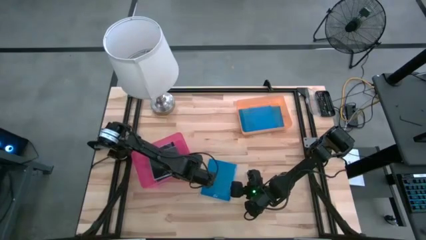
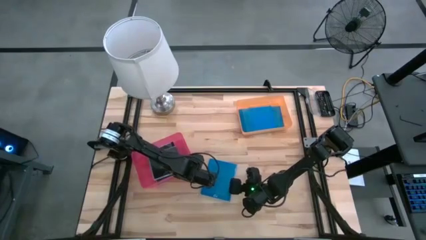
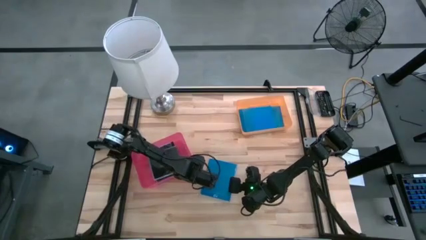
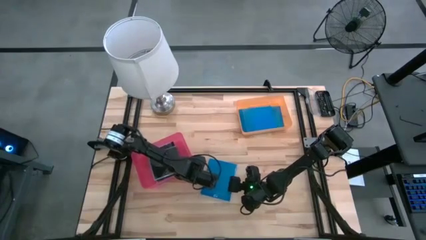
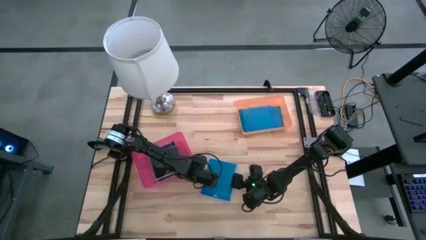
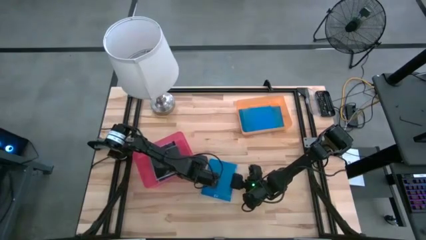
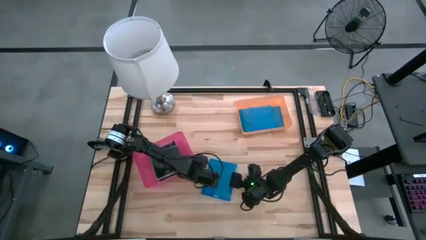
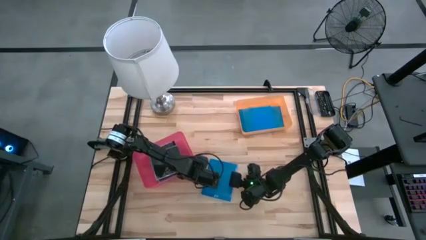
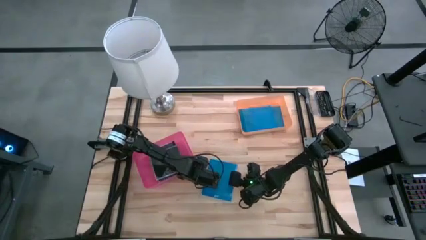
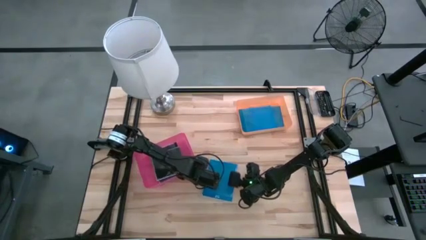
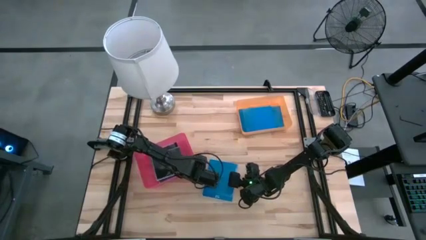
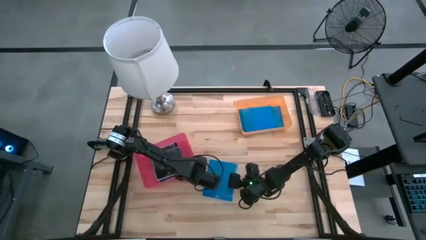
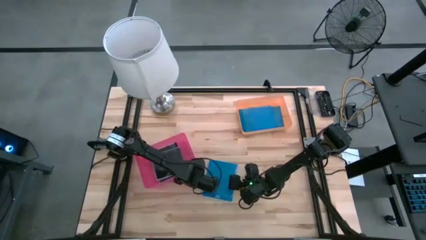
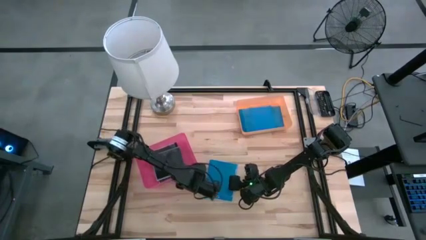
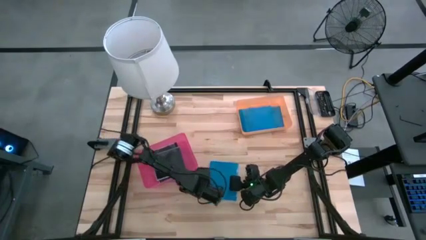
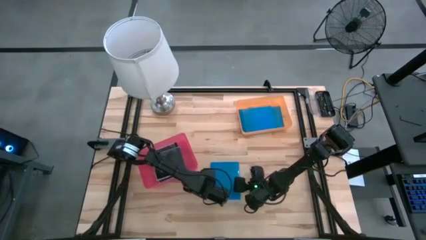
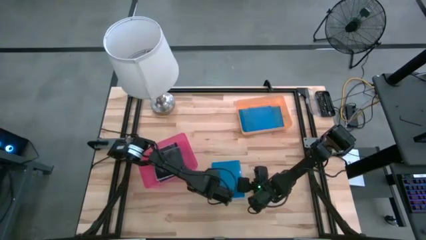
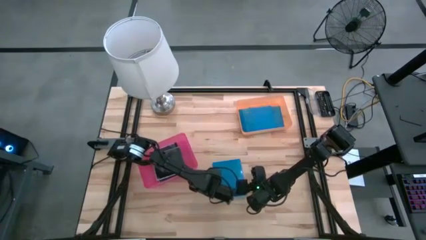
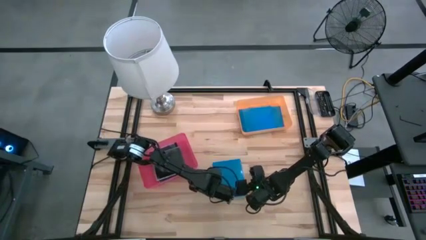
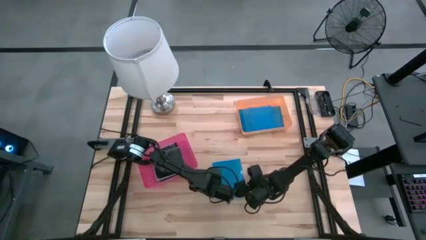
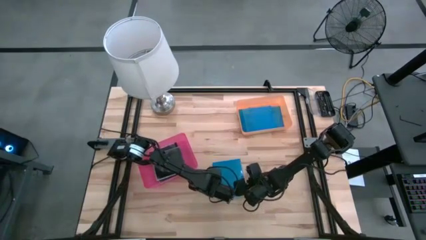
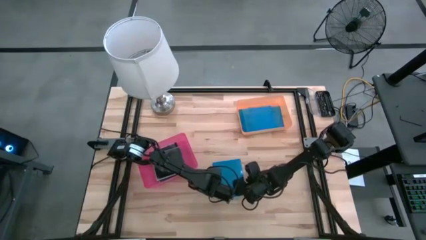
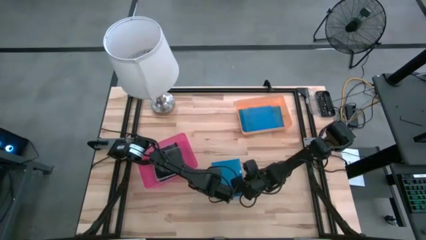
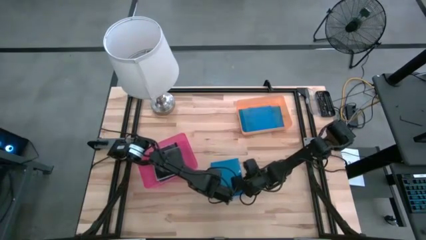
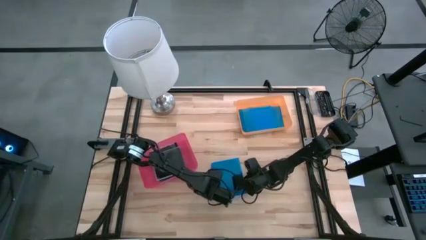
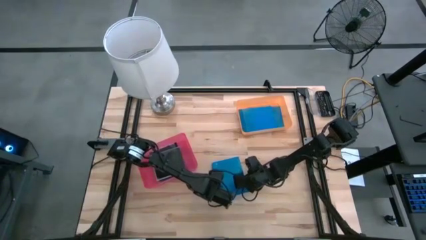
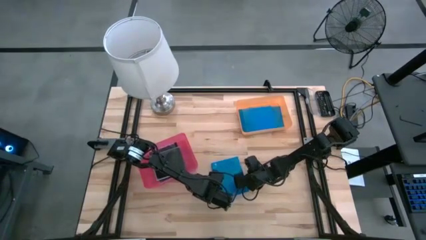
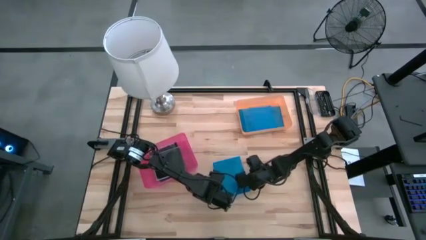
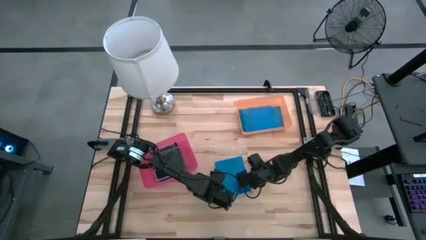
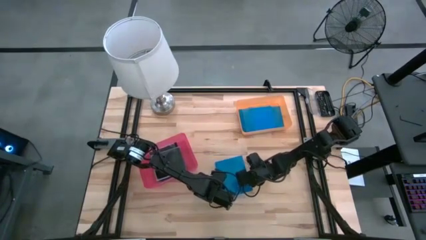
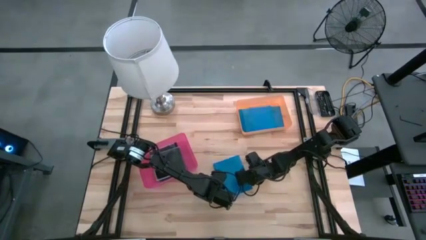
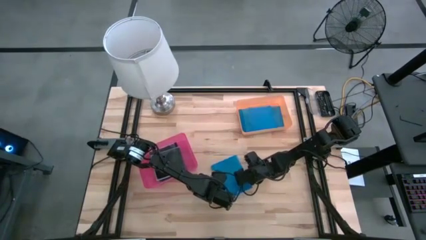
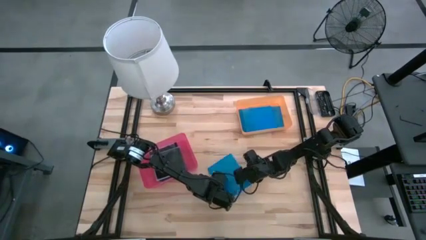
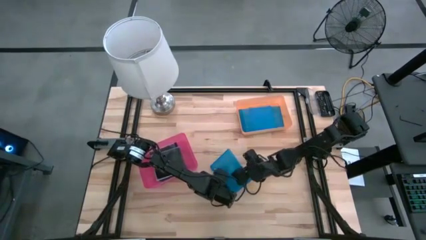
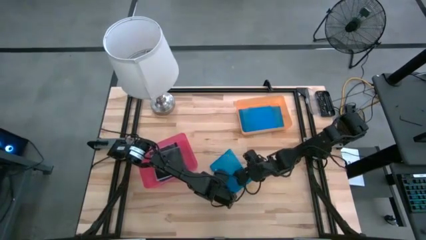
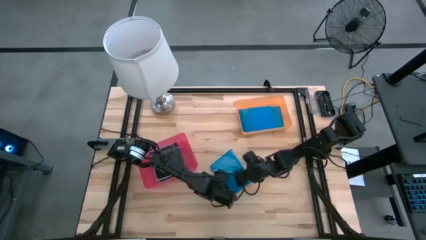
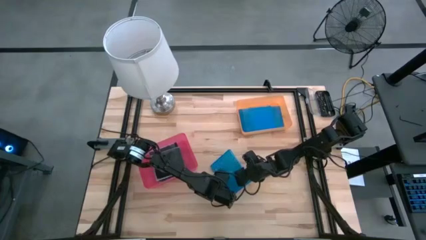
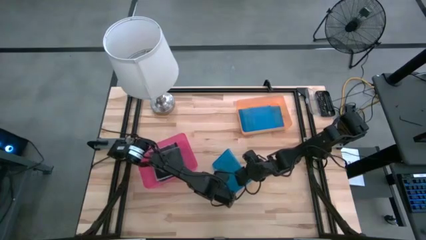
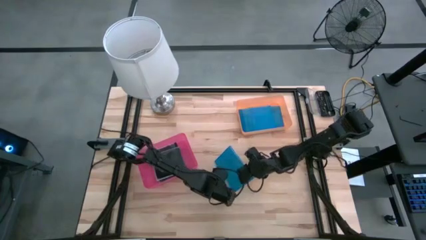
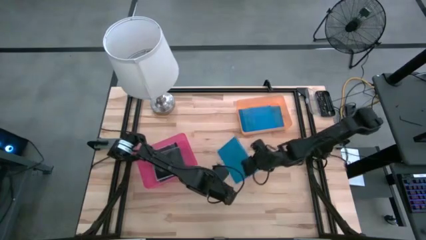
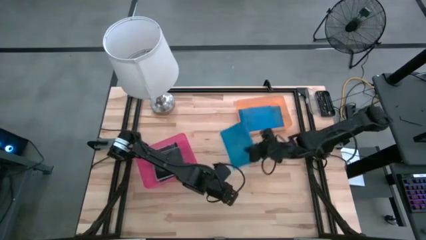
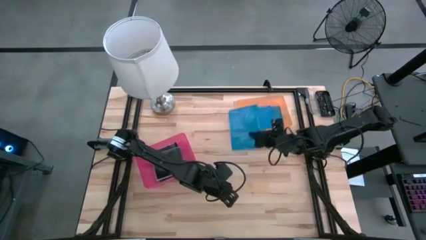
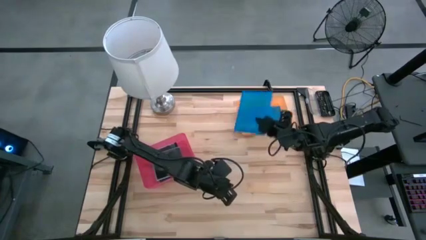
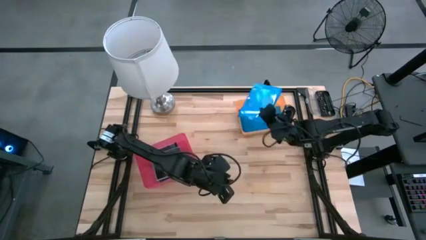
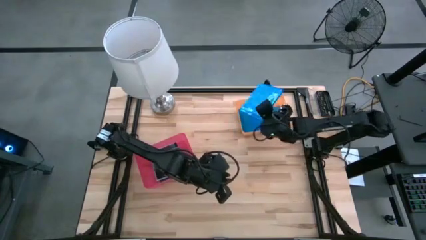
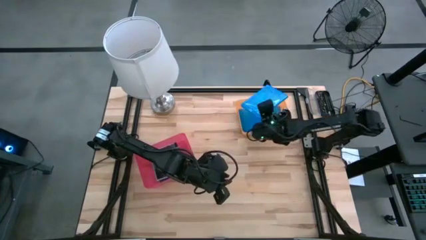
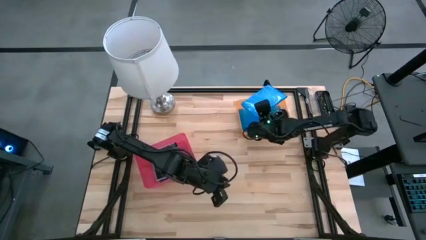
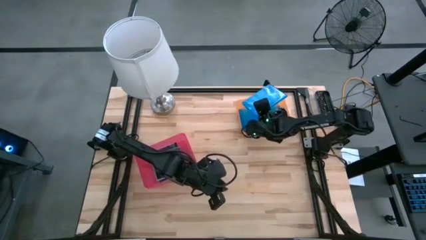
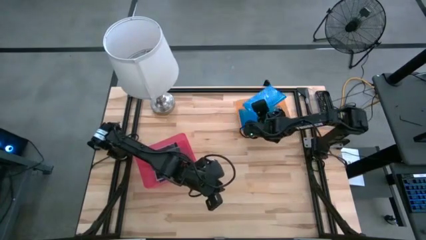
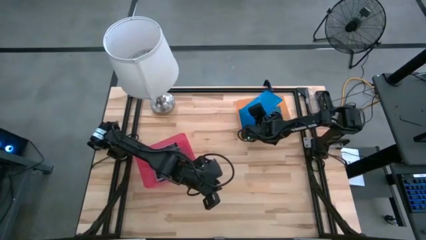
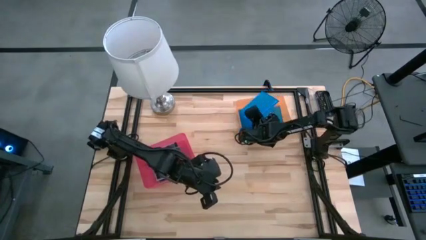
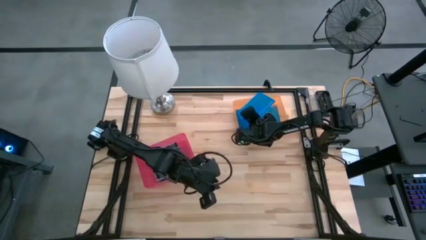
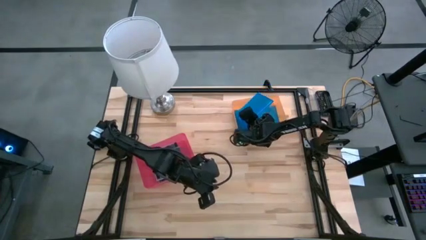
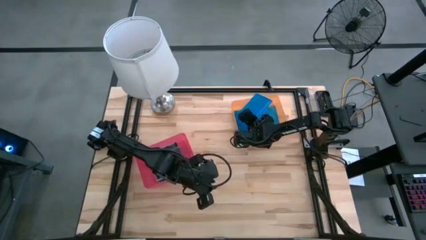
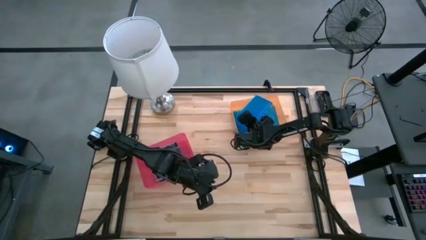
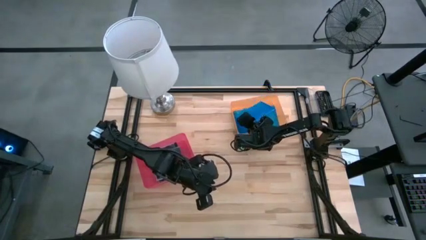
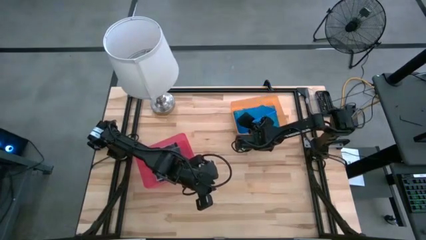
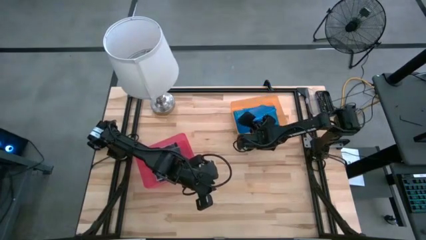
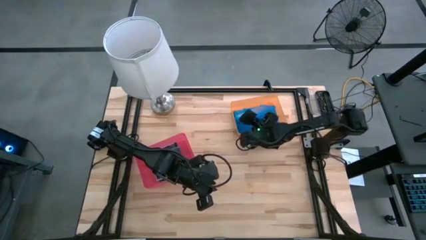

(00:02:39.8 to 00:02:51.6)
Task: Pick & place jewel cases by type
Put the blue CD case into the pink bin

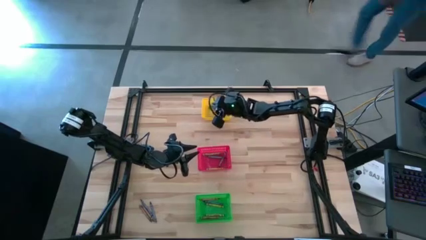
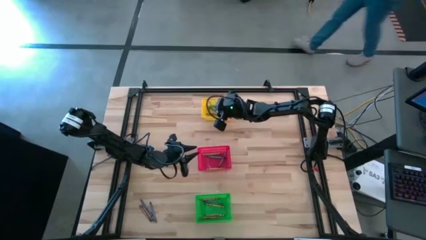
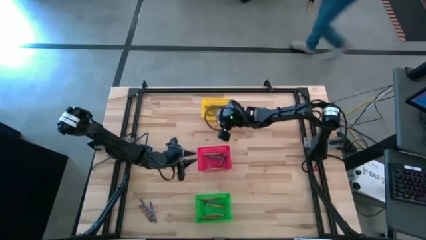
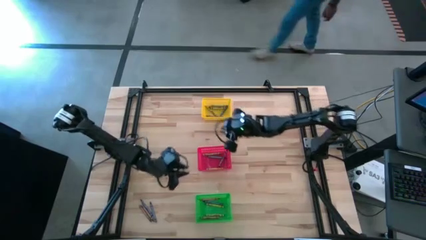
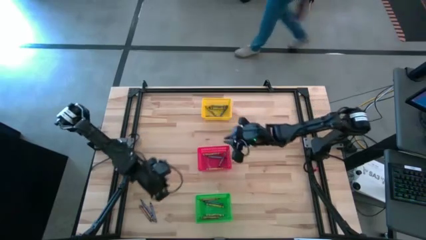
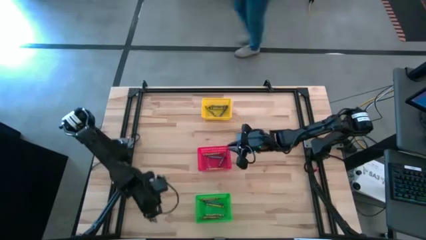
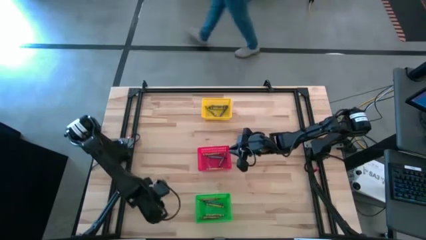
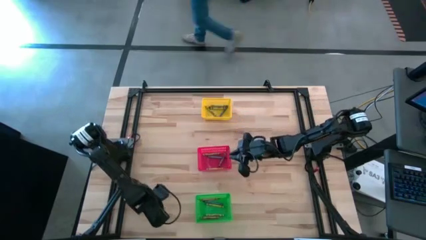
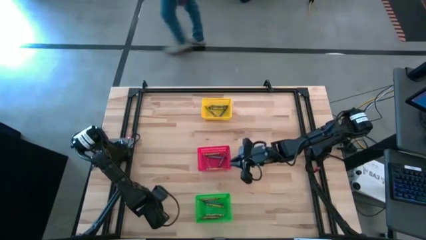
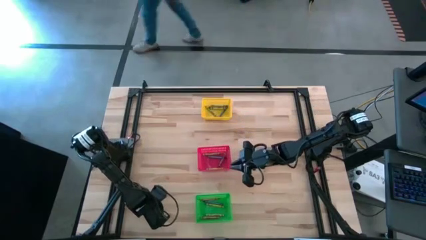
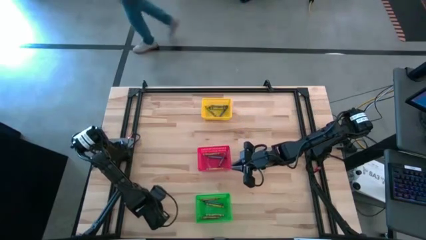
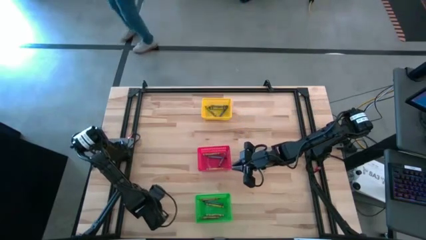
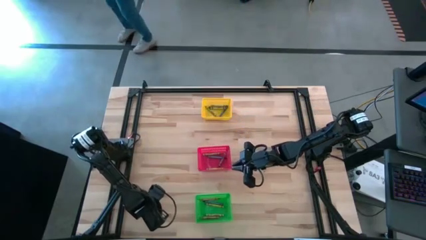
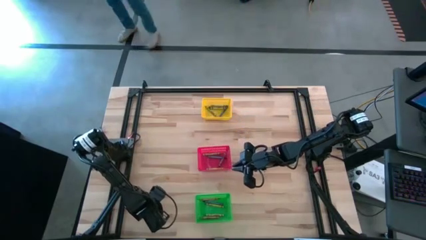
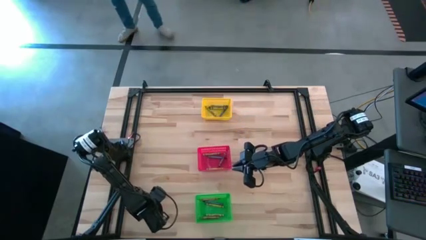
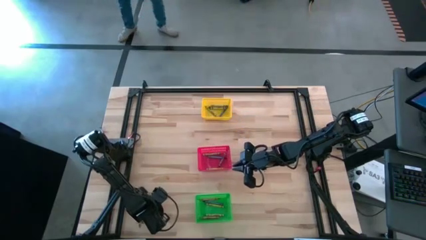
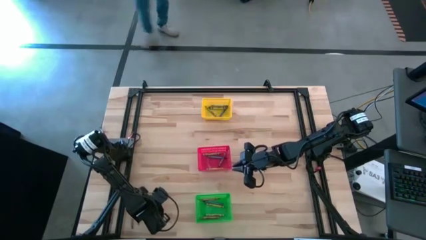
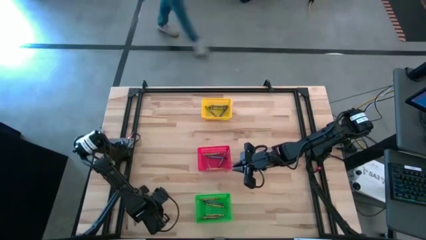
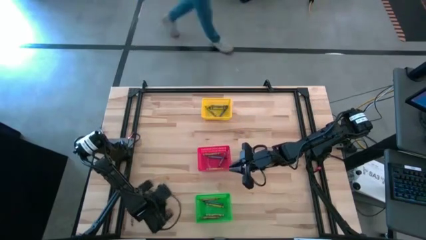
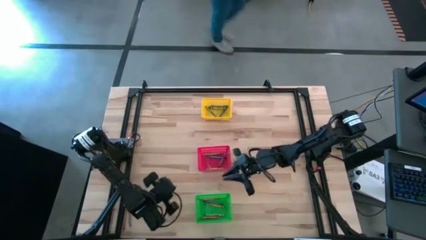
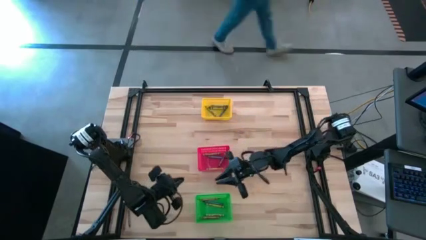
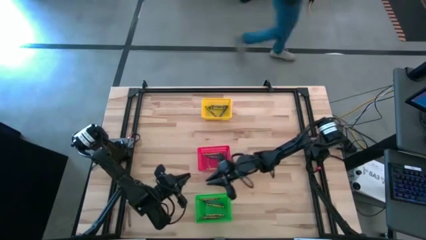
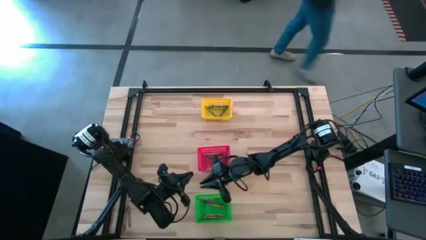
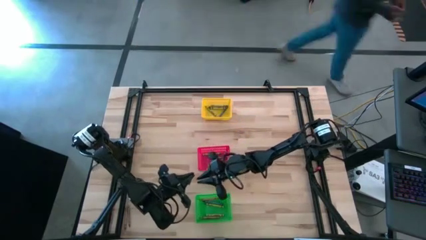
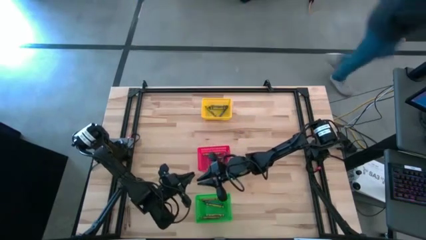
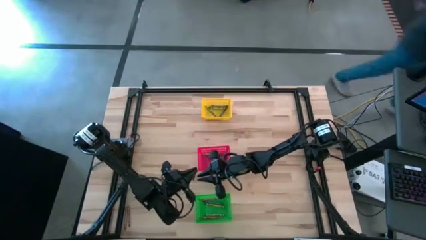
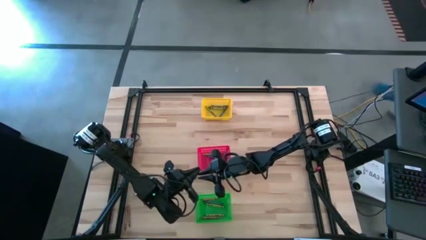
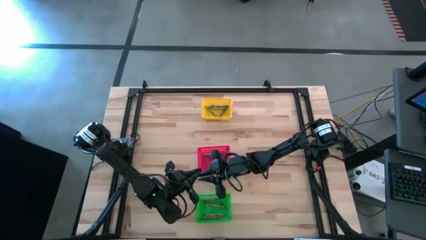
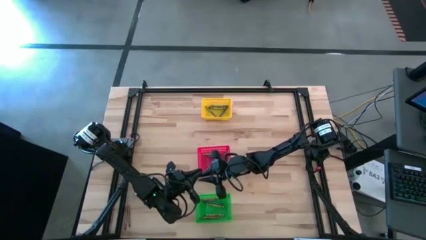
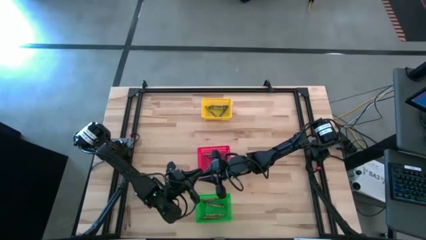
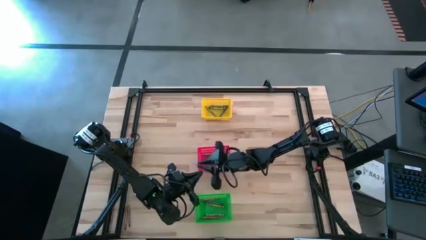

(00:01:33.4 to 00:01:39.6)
Task: Sort crayons
Put the blue crayon into the red bin
